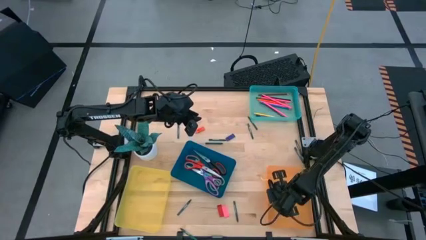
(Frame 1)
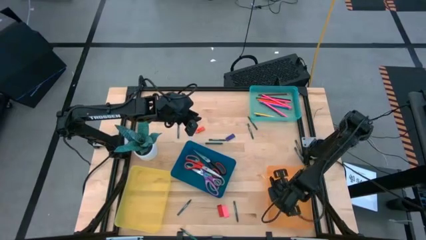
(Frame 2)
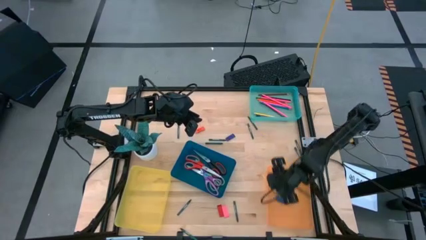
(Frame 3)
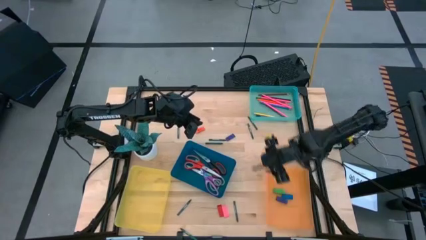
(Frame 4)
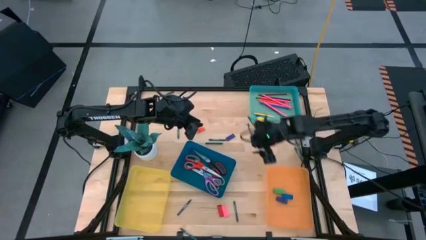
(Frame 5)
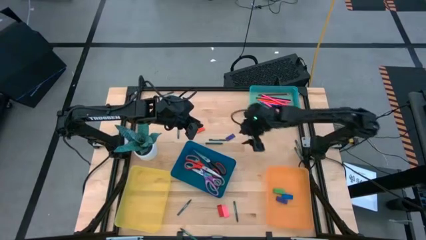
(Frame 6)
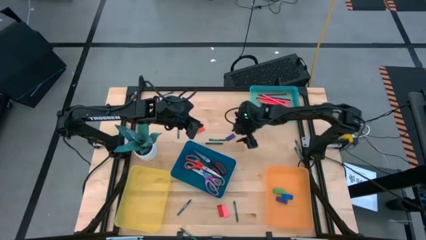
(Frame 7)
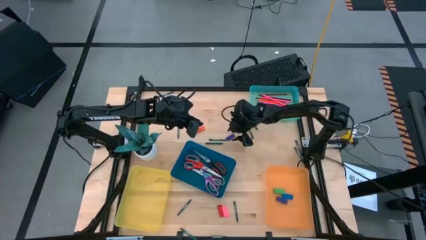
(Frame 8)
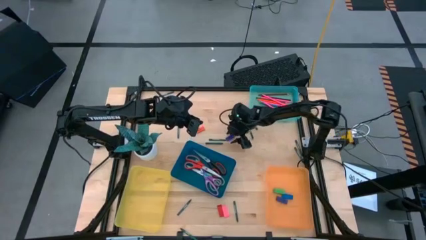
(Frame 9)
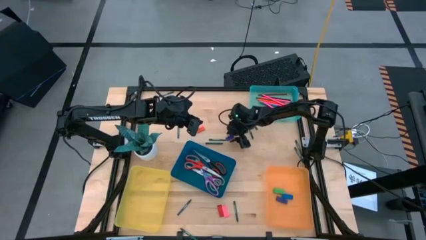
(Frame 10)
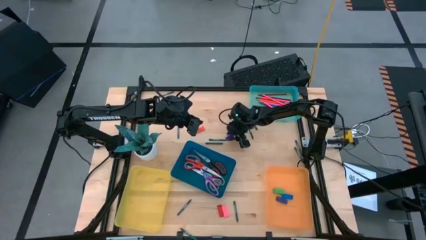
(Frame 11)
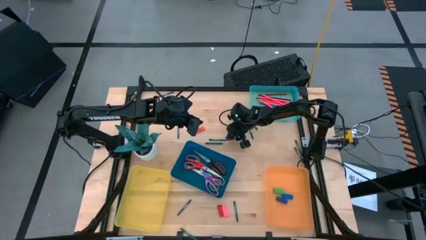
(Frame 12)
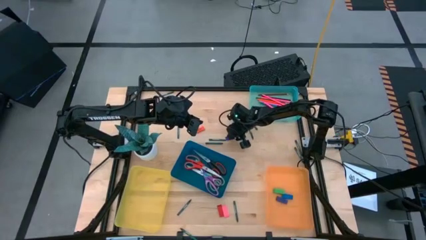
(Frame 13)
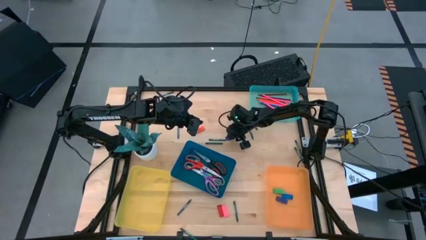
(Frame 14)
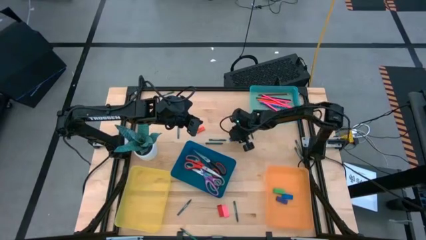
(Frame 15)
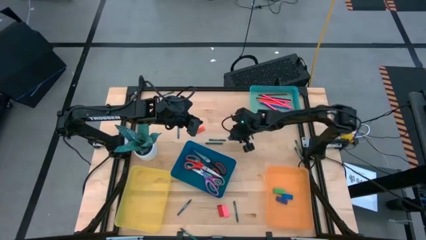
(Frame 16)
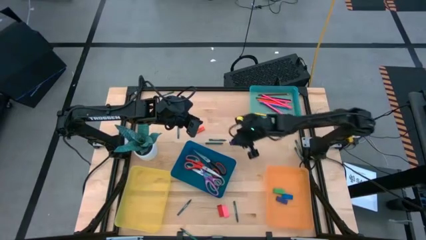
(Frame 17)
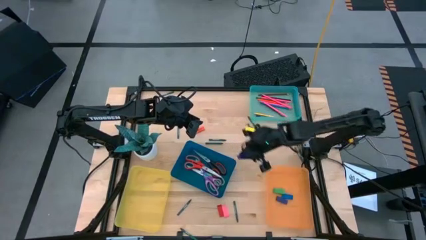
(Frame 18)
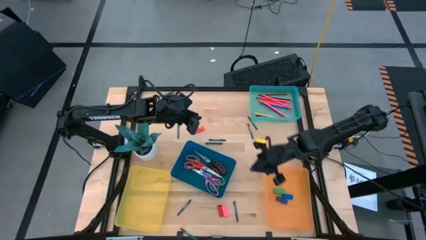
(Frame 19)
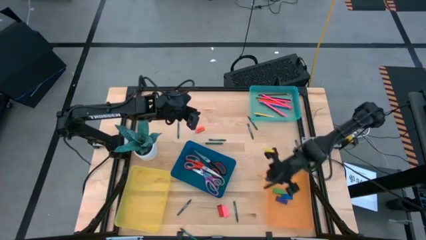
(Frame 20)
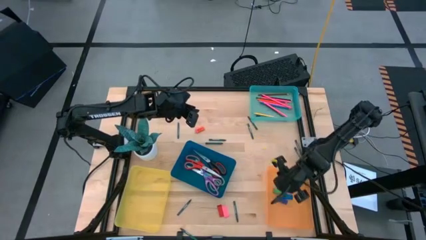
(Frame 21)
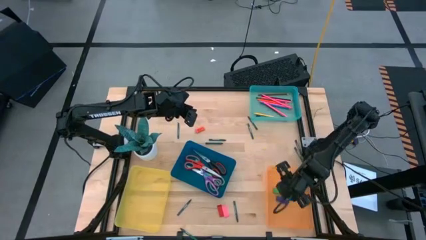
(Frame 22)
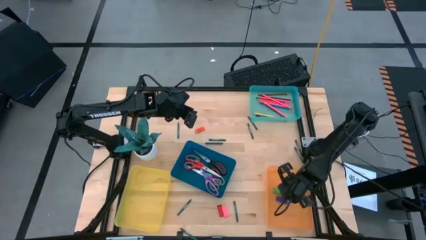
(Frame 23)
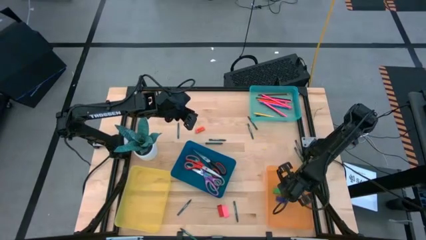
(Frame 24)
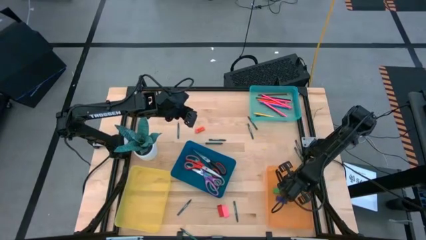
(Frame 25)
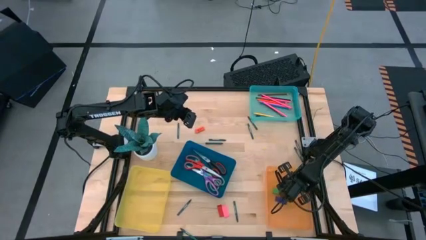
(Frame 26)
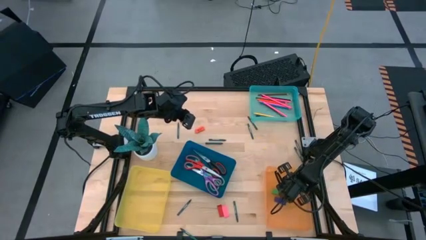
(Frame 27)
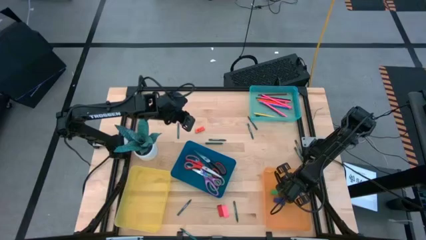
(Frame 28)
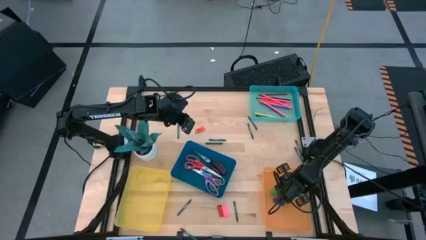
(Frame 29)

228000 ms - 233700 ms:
Task: Sort crayons/erasers/pens/pencils in bins
Put the purple eraser into the orange bin

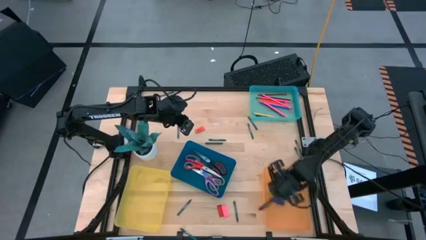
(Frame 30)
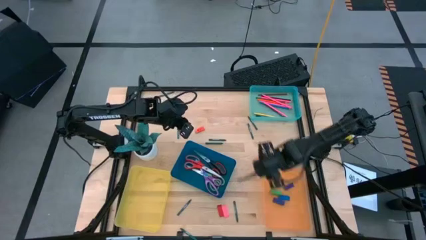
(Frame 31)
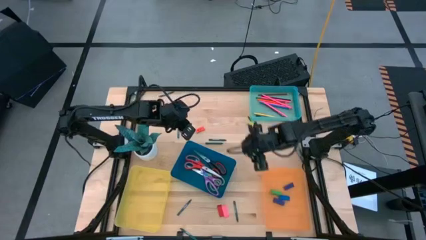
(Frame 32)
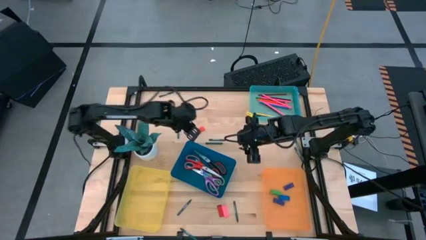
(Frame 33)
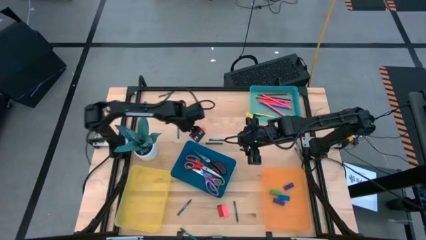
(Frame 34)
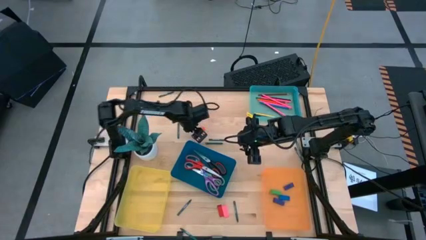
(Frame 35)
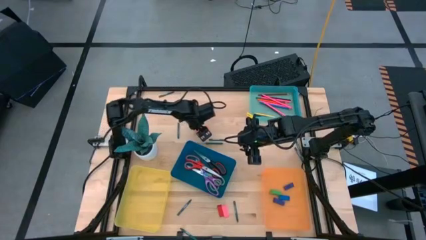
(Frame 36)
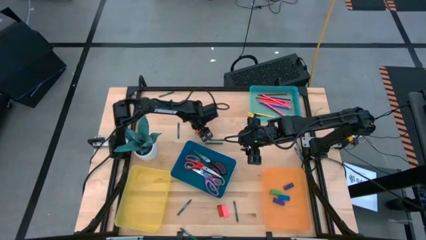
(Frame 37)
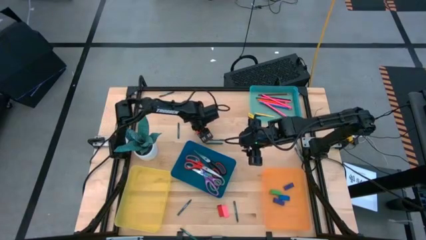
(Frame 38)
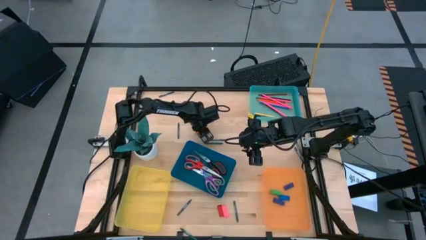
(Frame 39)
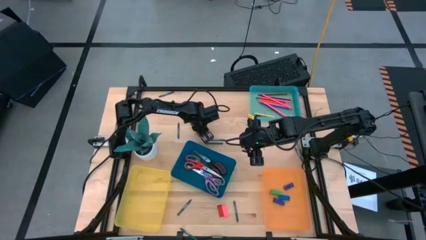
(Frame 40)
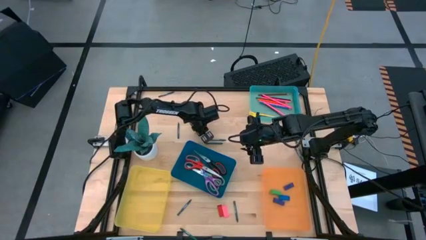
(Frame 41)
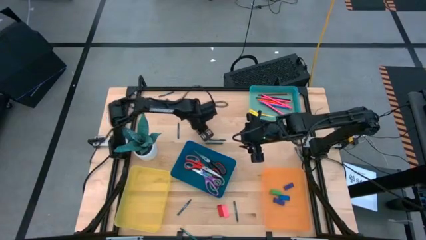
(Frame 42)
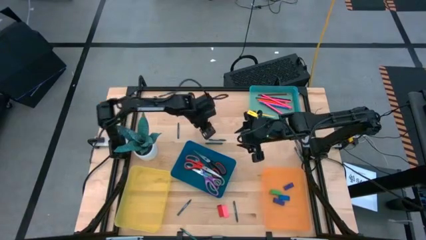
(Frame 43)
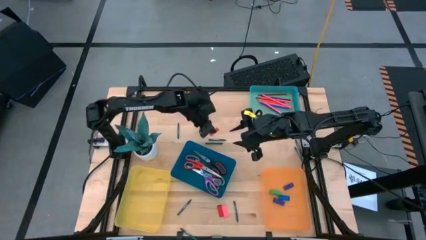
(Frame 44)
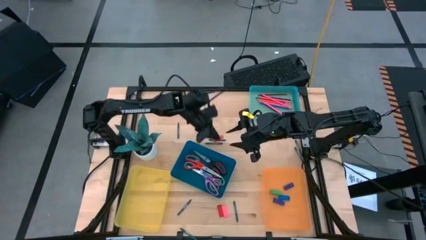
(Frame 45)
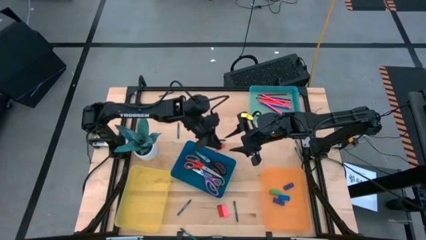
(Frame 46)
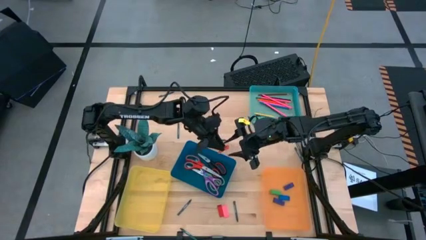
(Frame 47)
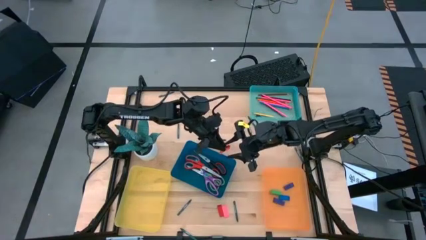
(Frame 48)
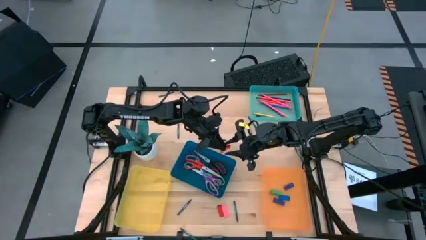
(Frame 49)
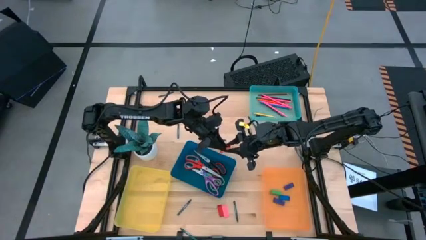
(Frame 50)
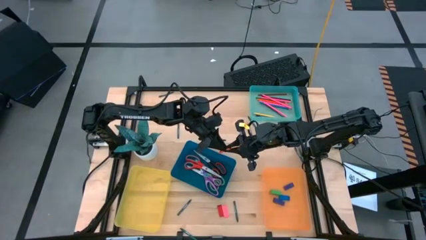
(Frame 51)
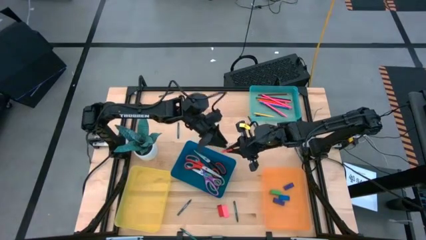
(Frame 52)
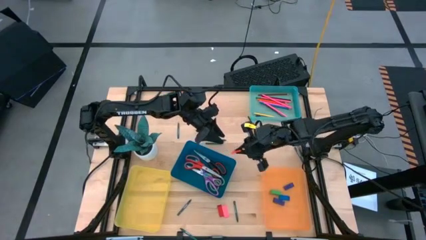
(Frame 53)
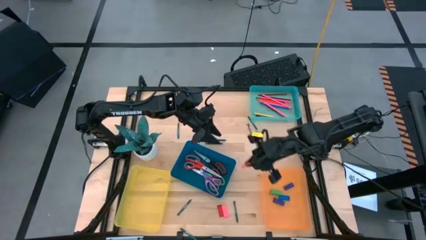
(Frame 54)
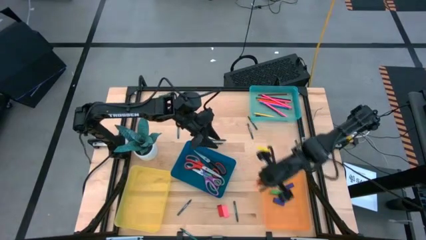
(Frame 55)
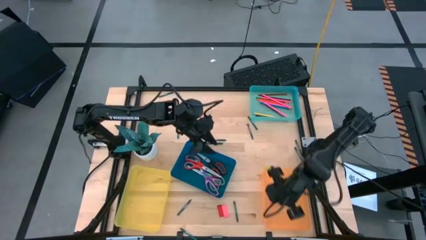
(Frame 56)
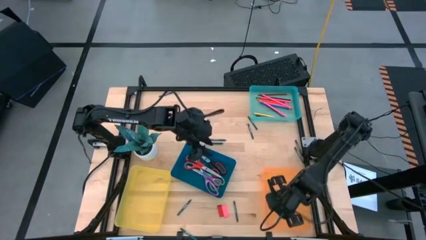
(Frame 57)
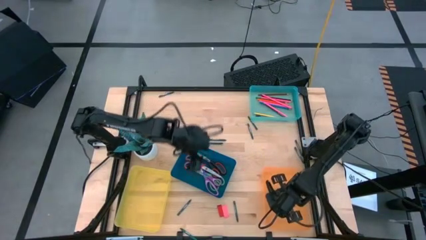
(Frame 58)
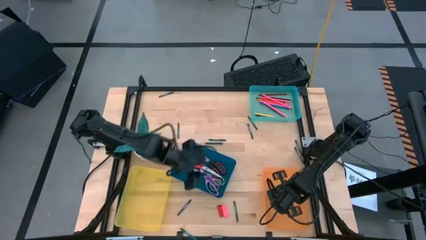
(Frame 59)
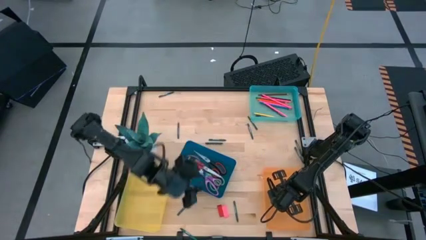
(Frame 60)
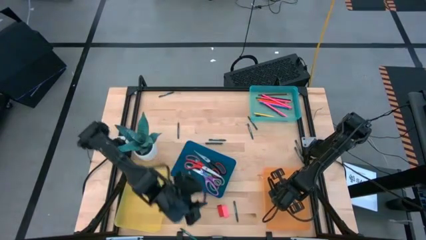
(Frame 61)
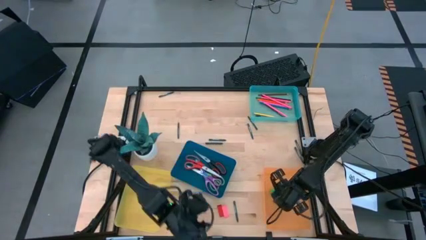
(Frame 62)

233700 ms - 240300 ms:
Put the orange eraser into the orange bin

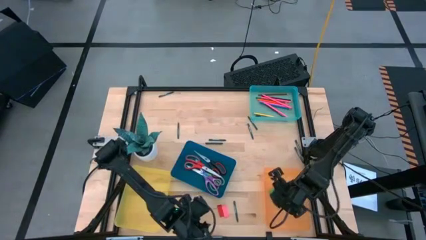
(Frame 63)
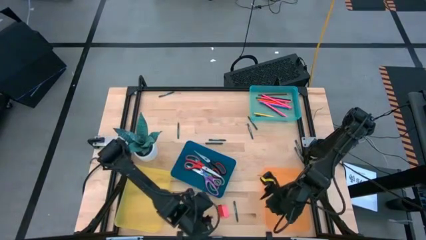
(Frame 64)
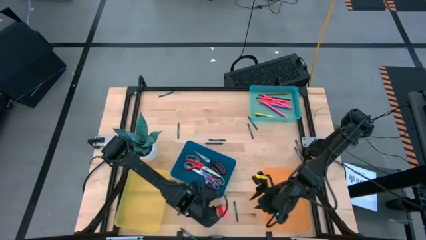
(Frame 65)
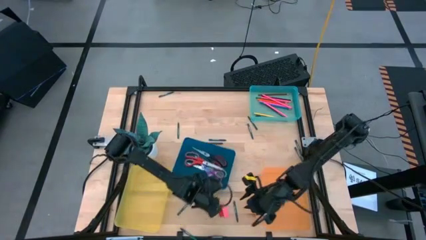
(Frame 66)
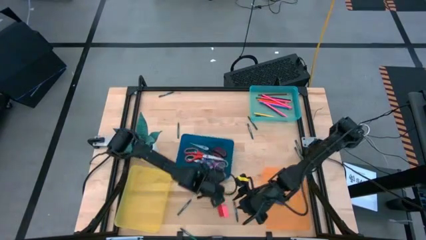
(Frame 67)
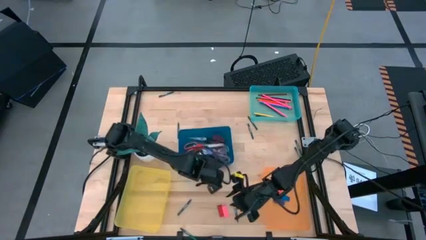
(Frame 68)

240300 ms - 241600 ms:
Adjust the blue bin

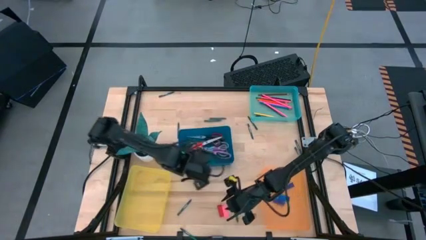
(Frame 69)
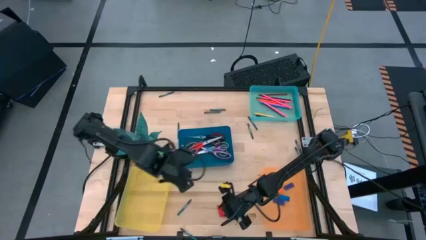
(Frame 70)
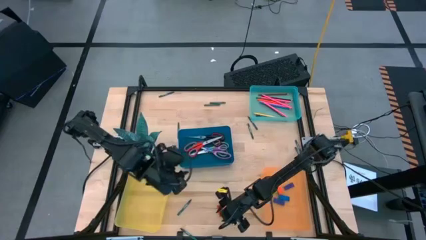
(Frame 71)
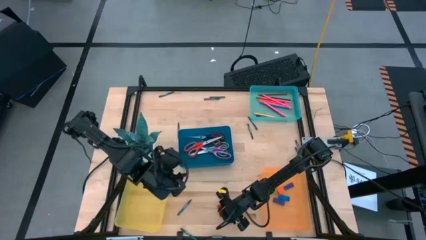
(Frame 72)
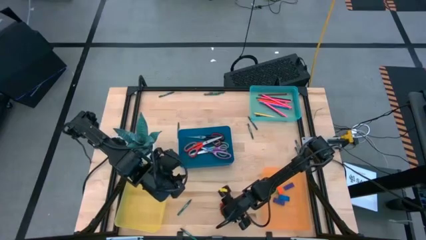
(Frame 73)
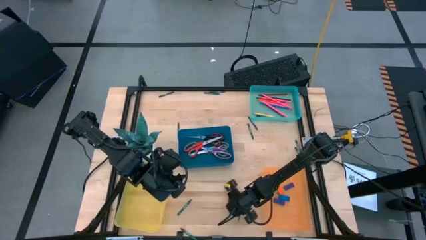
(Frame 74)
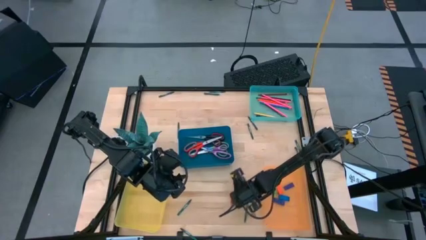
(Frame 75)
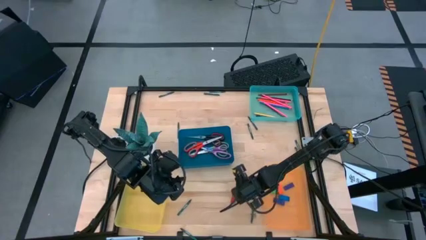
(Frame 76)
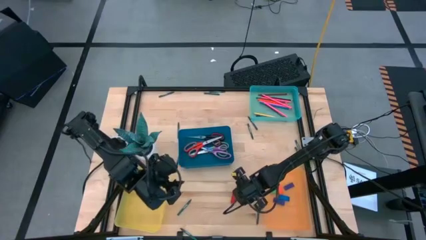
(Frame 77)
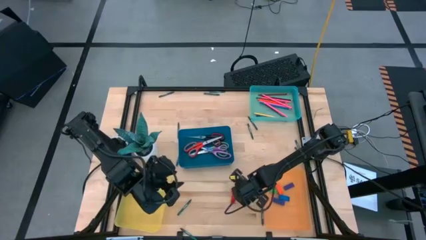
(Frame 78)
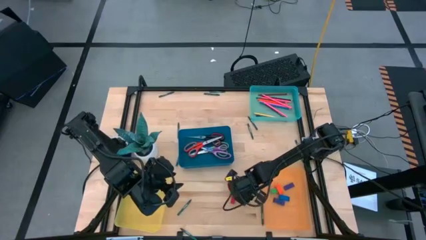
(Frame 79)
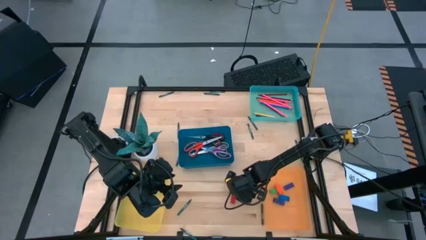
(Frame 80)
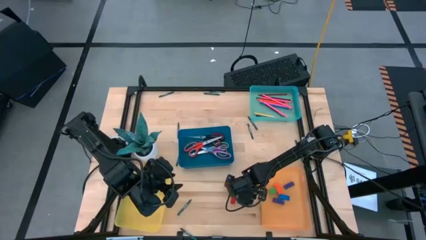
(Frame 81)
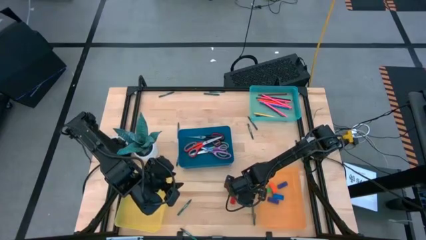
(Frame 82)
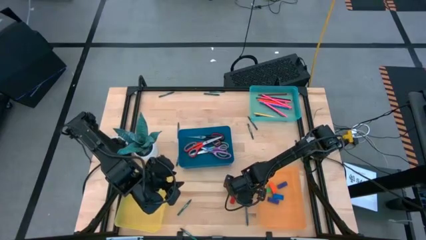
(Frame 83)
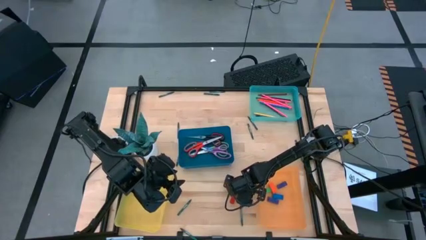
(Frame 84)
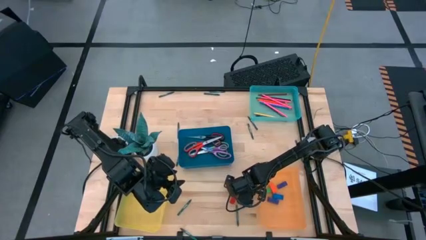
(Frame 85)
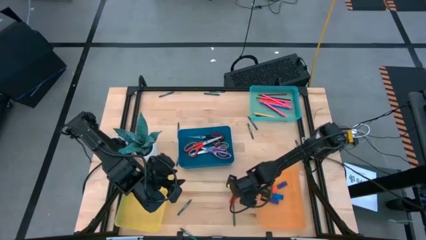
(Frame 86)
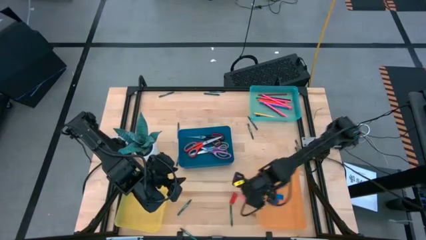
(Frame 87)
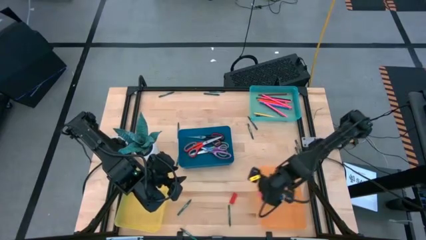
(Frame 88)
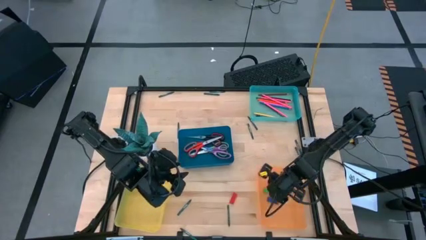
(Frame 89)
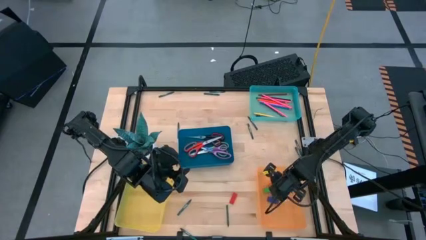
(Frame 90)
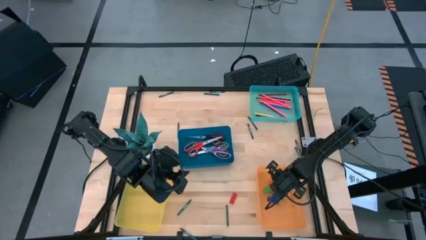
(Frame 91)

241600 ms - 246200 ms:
Put the pink eraser into the orange bin
